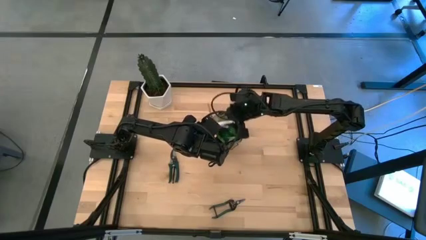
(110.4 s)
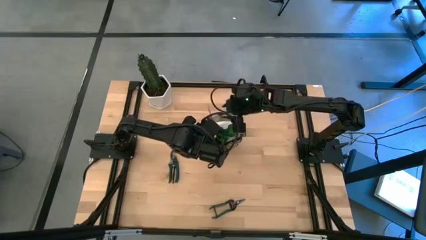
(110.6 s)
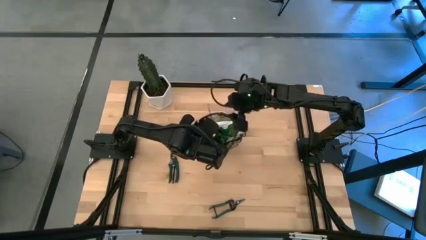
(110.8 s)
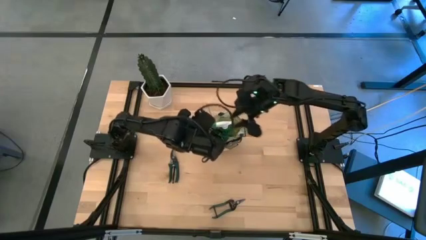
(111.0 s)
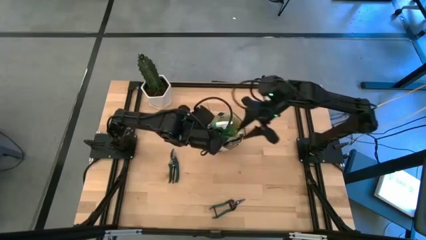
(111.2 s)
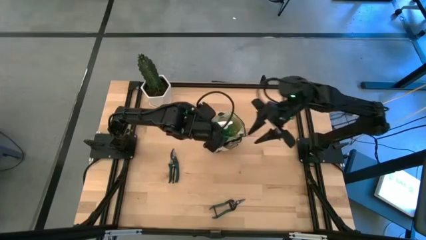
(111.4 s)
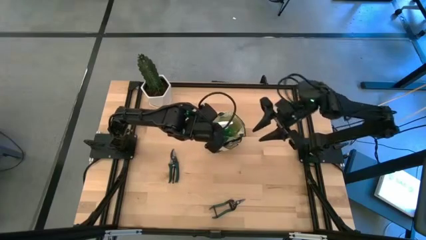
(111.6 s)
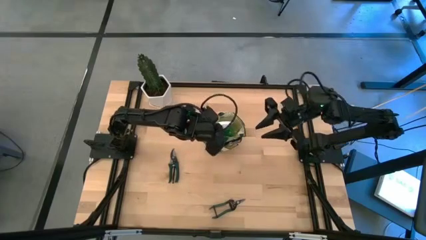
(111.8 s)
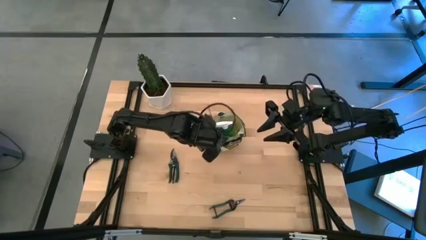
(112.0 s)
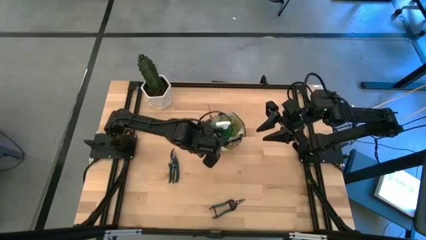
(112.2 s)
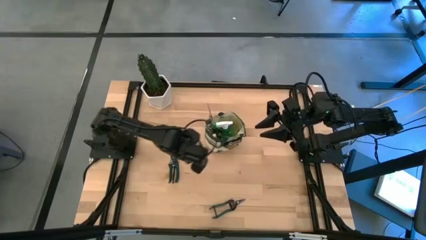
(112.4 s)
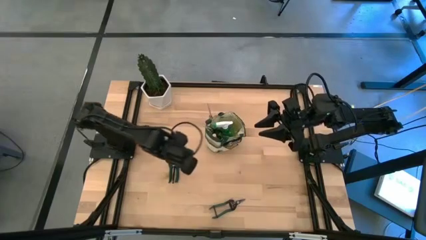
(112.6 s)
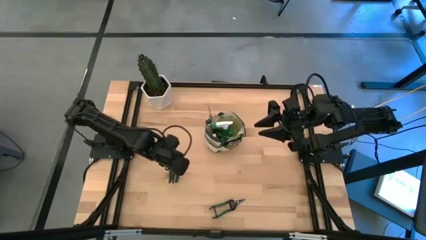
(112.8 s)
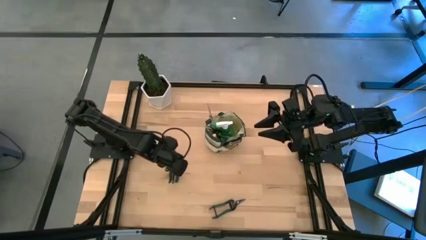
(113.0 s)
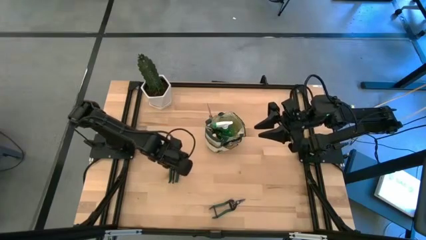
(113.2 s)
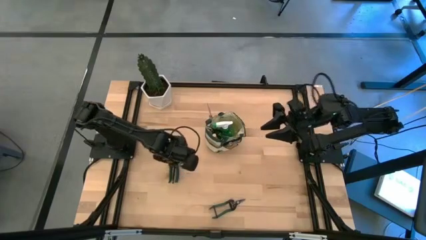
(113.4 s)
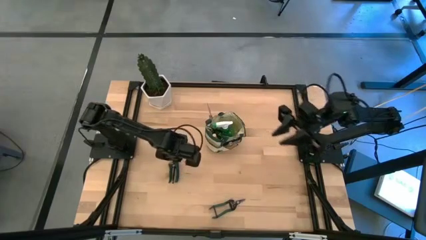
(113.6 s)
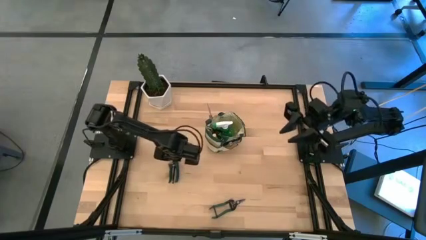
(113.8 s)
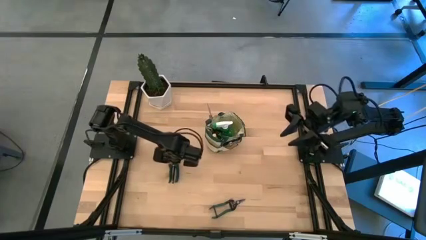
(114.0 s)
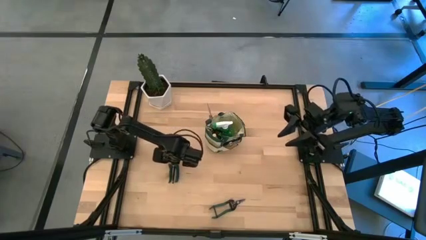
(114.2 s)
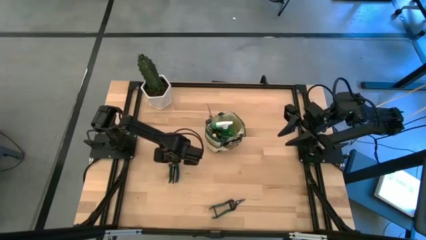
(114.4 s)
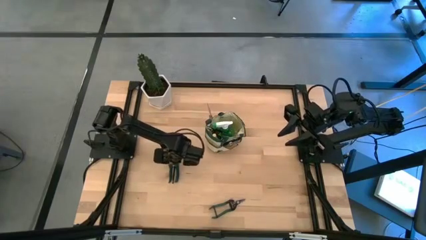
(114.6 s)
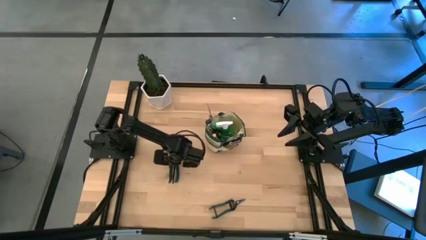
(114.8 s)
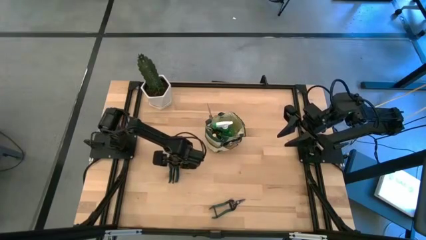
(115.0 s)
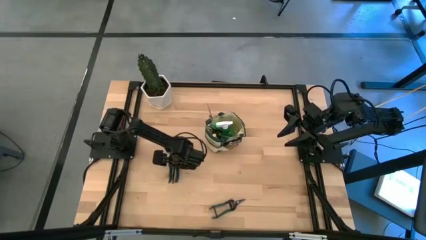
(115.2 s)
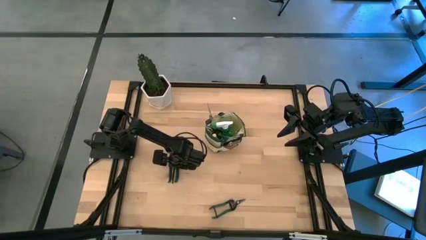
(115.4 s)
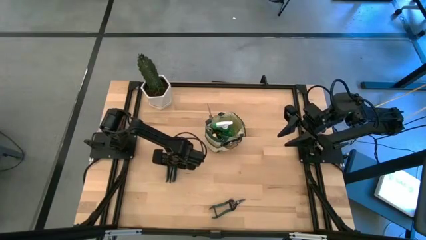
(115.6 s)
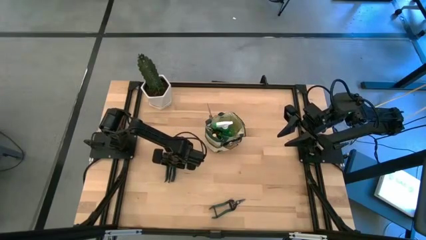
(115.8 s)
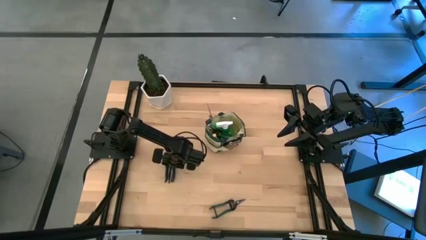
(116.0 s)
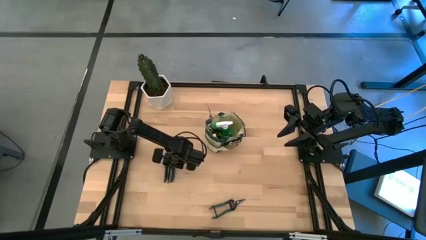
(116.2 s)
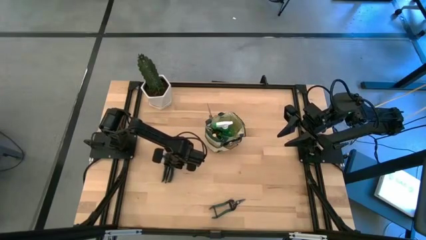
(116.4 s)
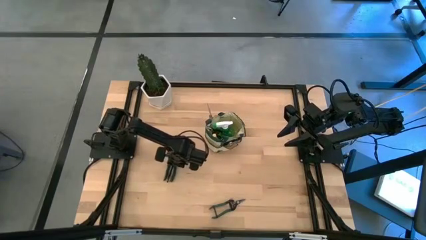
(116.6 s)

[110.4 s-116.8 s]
Task: Pick & Place Garden tools in Gardening bag
Put the top shear scissor into the gardening bag

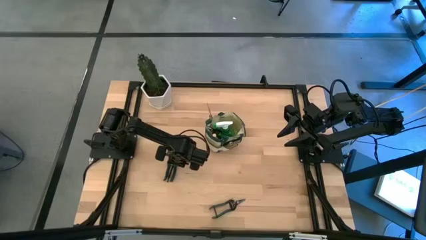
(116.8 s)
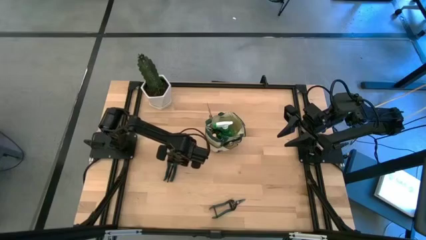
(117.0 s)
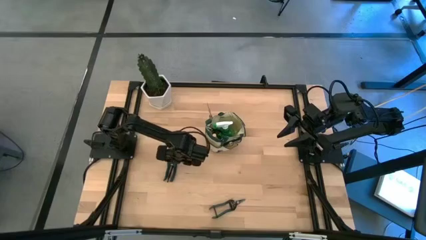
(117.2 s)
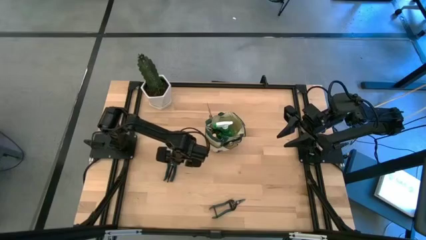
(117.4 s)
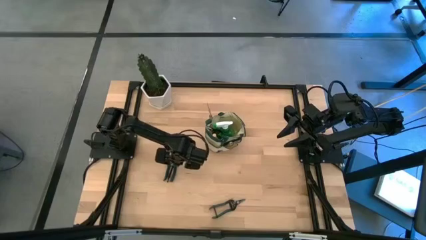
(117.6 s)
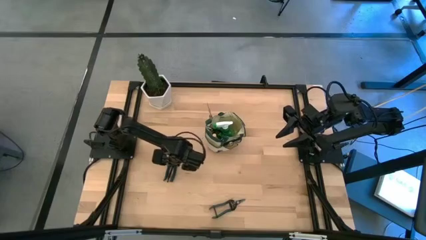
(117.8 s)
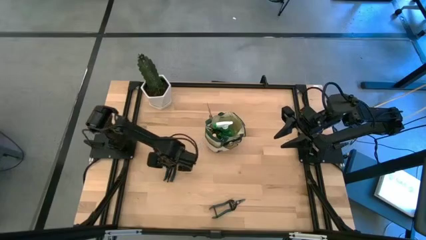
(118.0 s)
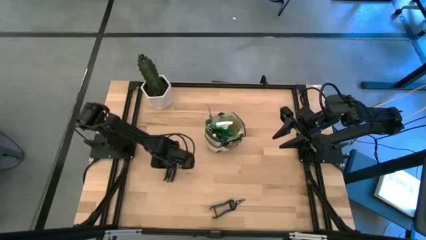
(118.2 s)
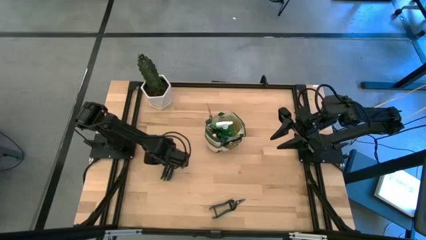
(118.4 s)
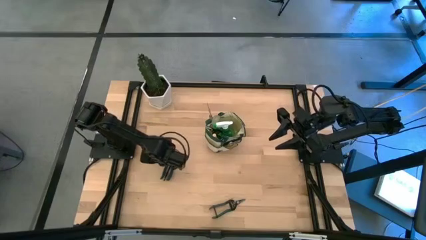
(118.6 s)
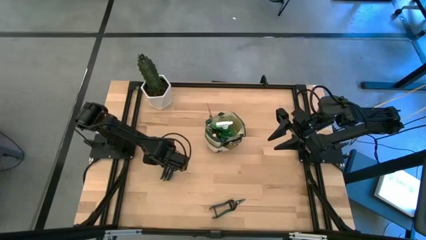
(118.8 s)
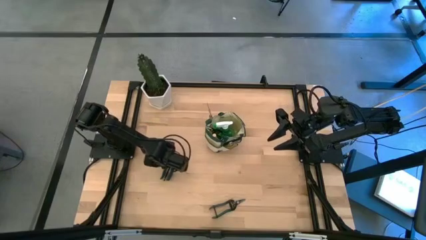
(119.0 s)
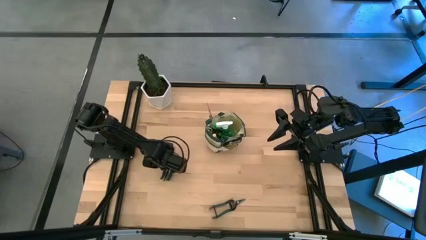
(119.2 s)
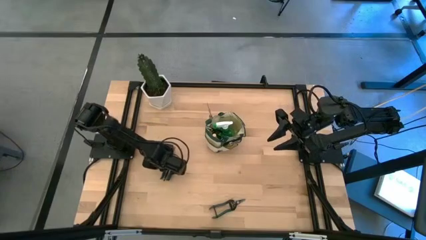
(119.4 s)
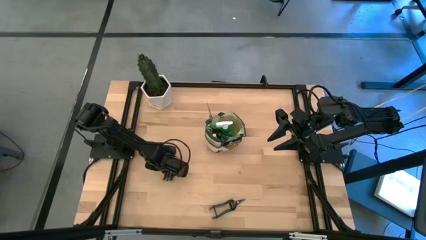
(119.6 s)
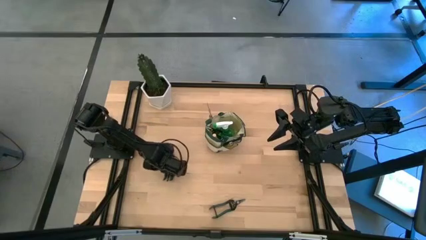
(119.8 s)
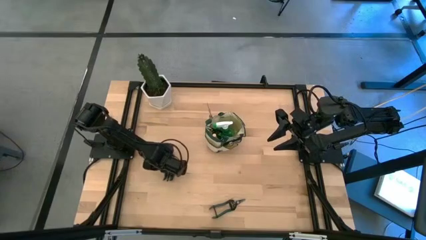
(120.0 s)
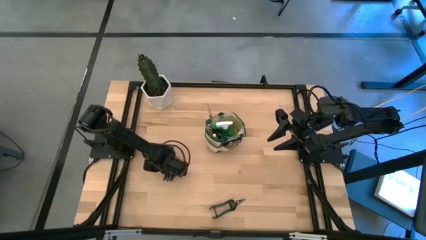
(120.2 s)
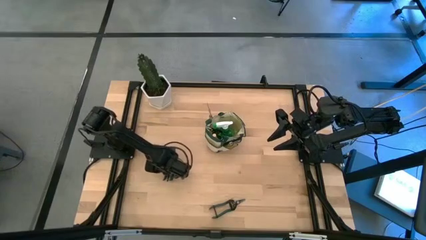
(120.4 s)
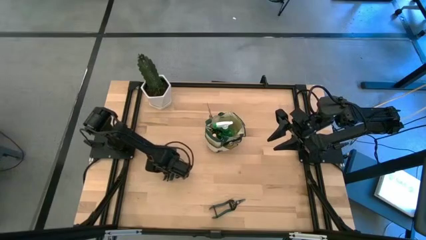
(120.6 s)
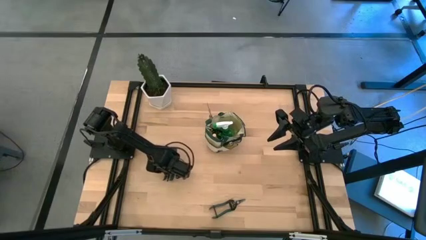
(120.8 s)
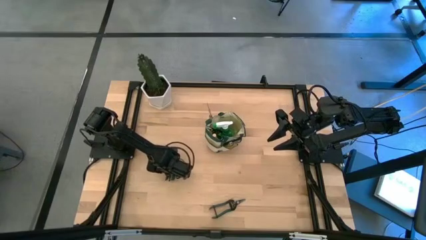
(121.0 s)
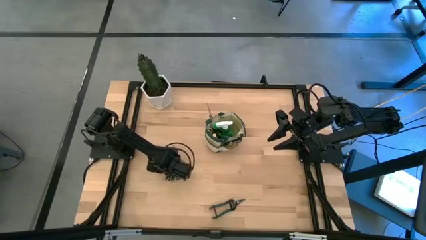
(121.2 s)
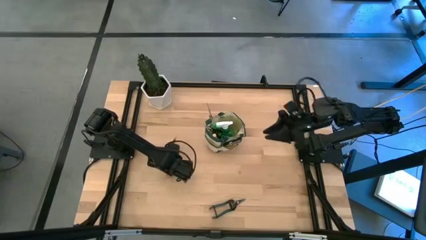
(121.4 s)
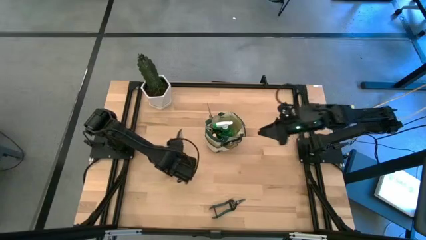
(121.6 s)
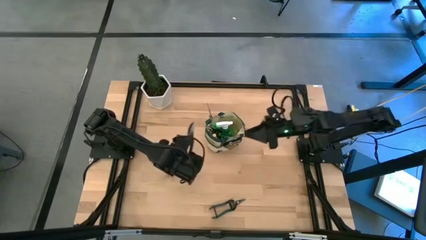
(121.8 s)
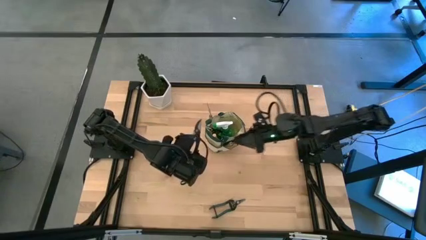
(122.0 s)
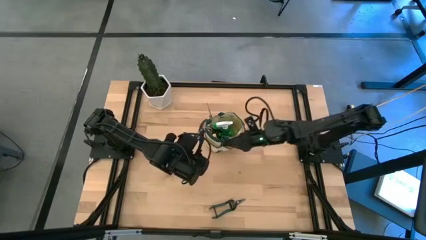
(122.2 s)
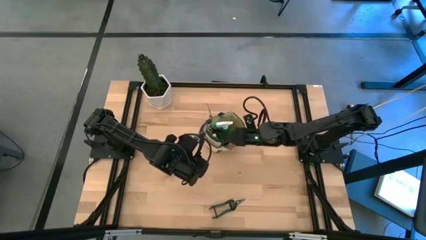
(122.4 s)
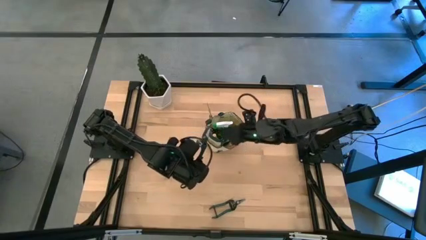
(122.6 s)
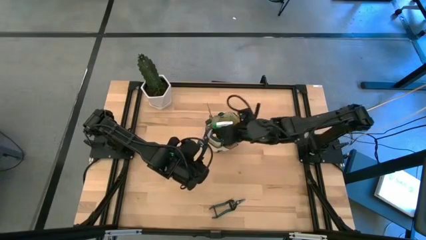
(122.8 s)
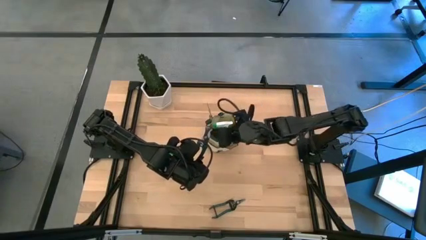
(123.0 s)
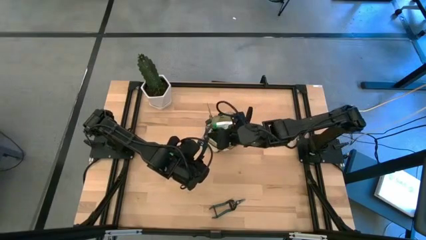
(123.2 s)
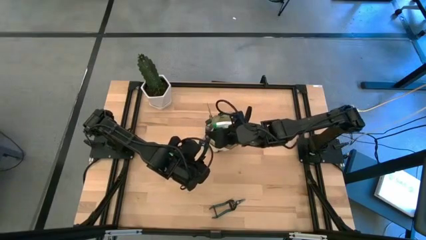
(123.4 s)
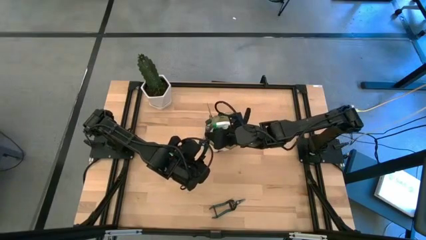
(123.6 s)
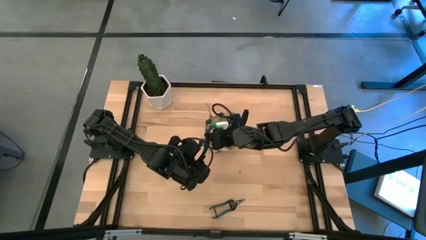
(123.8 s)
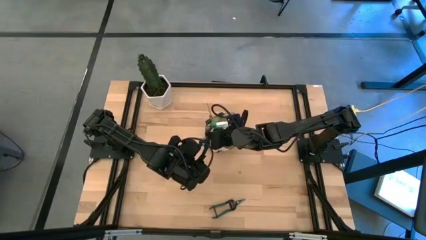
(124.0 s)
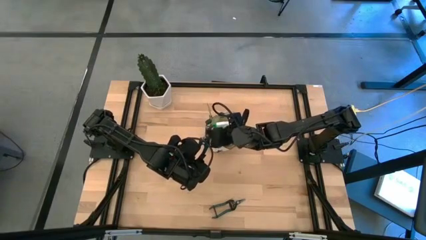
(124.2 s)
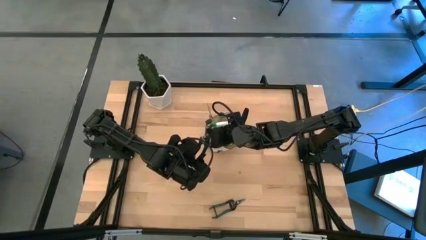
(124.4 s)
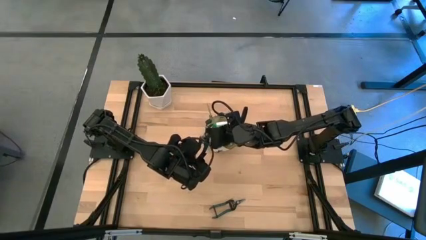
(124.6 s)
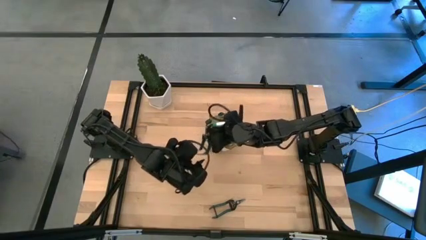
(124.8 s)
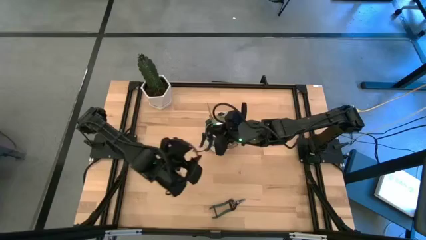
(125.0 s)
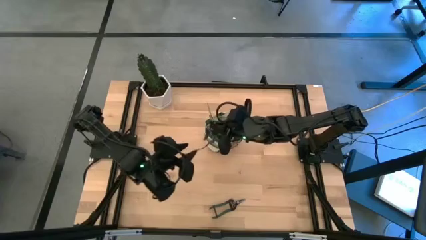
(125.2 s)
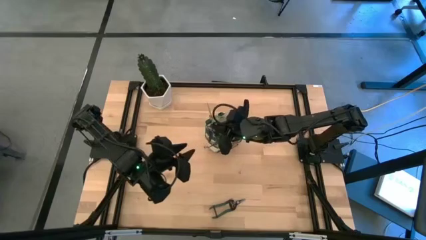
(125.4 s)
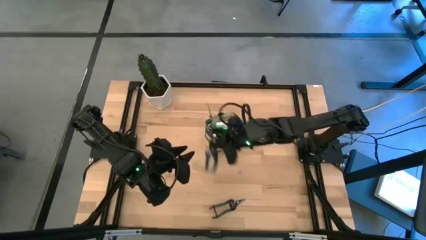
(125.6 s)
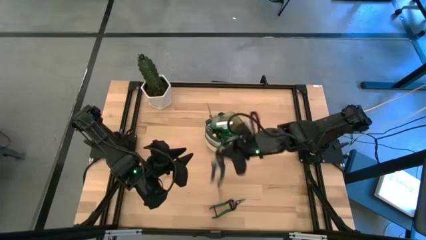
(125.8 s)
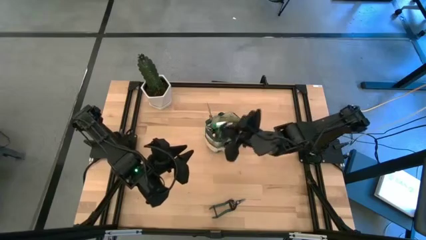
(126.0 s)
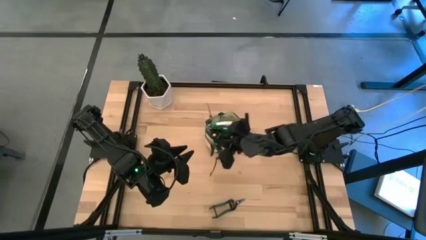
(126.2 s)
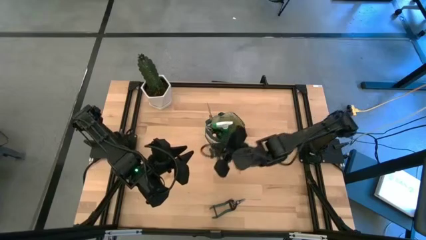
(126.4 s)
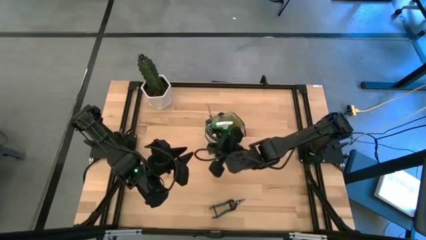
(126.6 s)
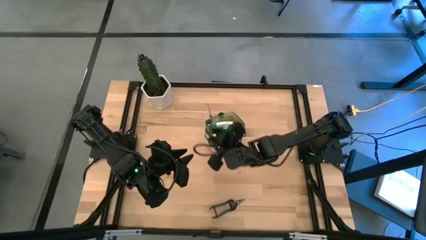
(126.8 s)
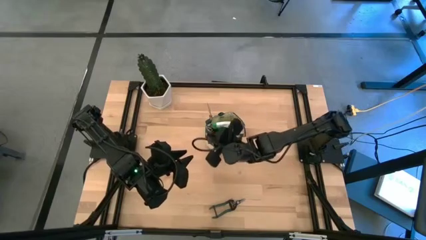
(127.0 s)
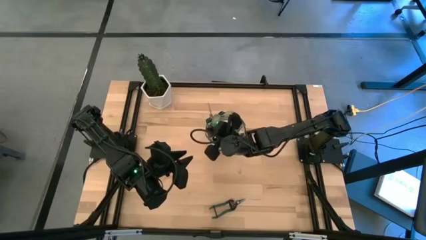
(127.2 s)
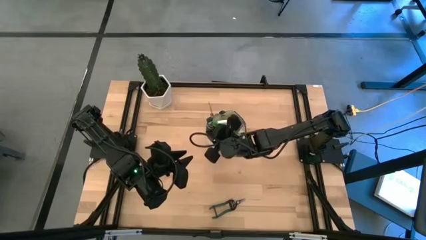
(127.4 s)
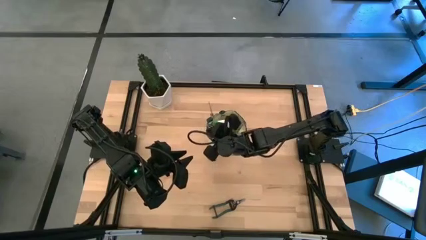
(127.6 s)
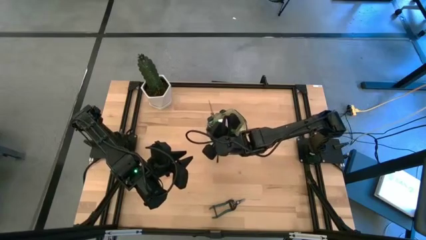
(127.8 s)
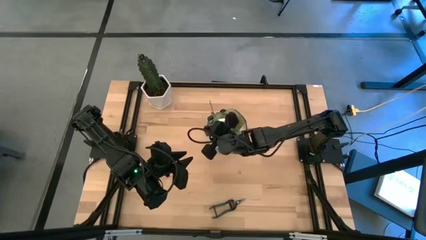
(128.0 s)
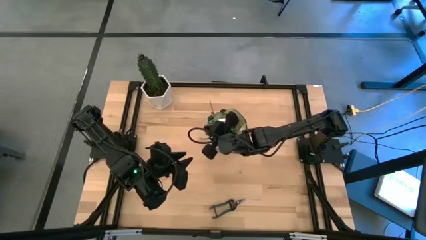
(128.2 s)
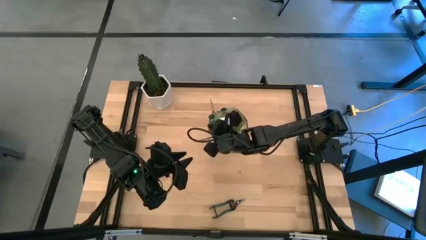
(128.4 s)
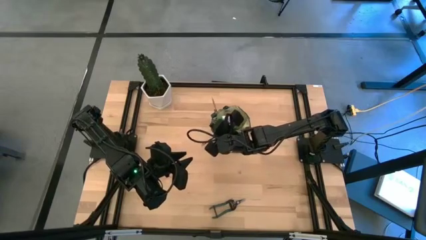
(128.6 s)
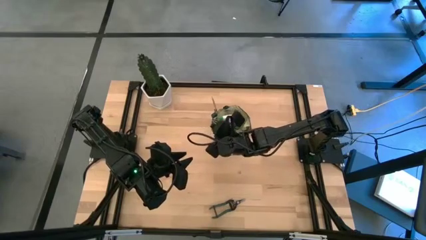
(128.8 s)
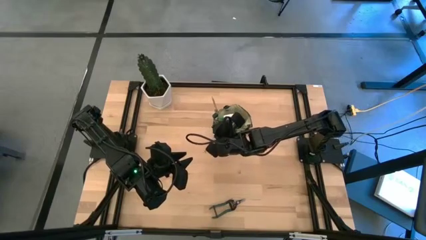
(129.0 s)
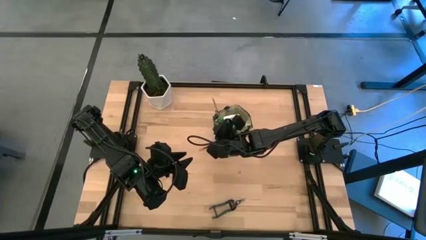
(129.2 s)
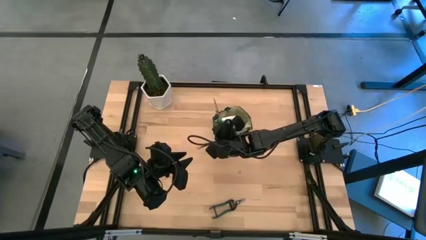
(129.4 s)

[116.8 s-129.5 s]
Put the top shear scissor into the gardening bag
